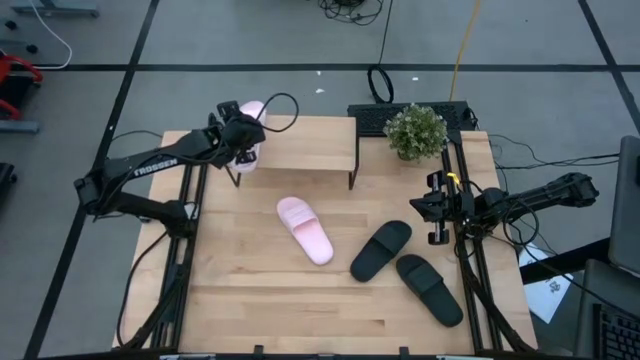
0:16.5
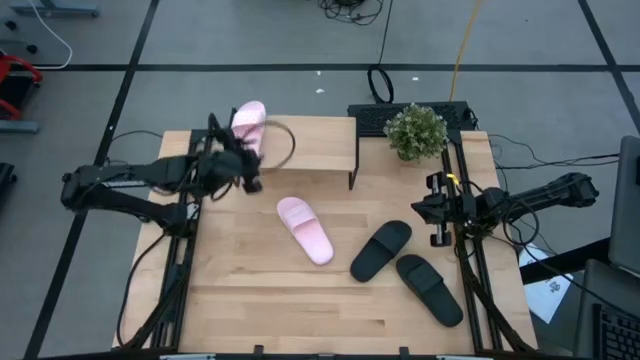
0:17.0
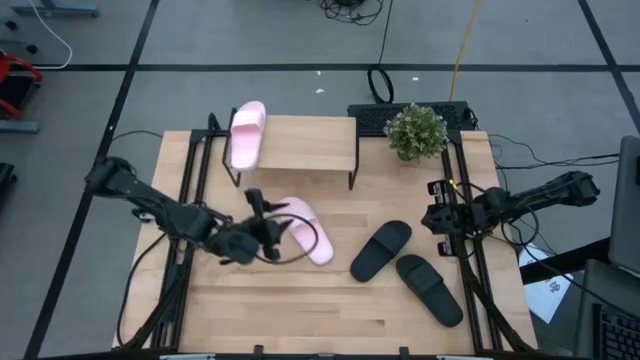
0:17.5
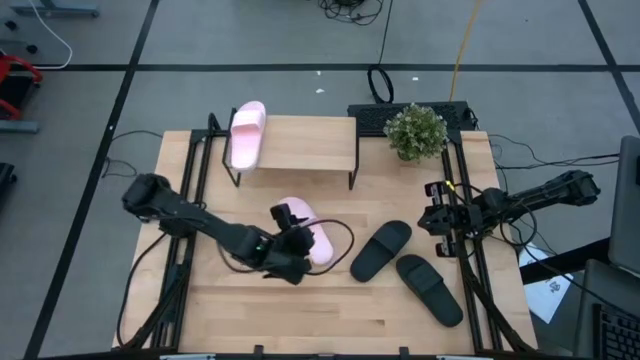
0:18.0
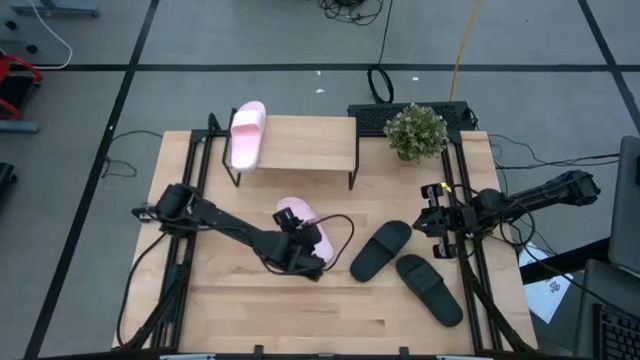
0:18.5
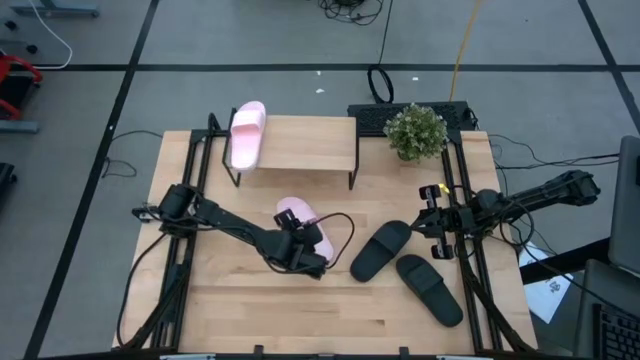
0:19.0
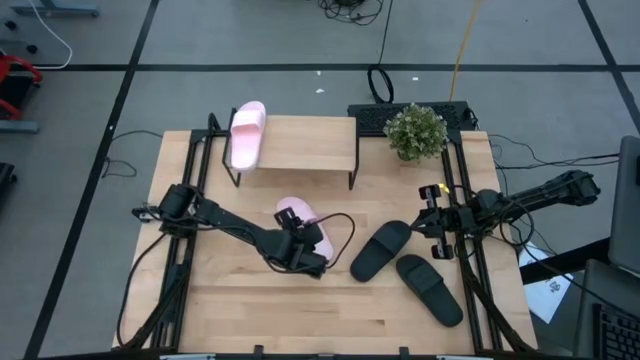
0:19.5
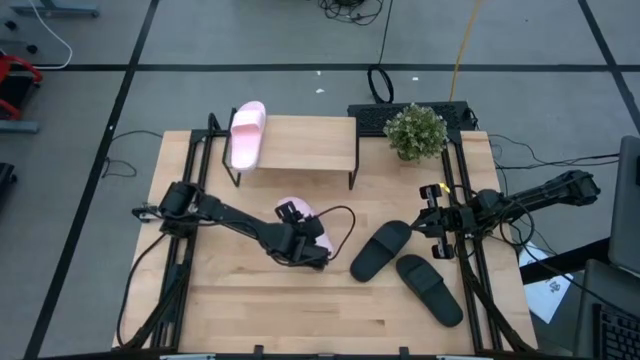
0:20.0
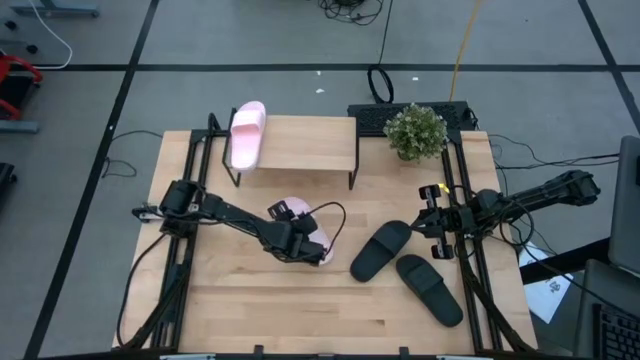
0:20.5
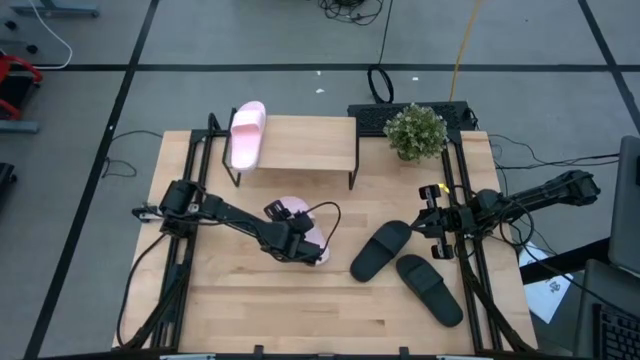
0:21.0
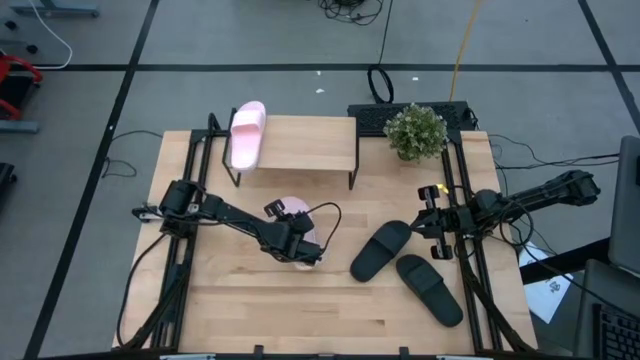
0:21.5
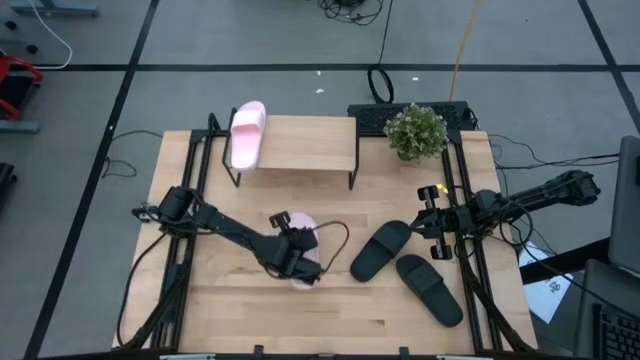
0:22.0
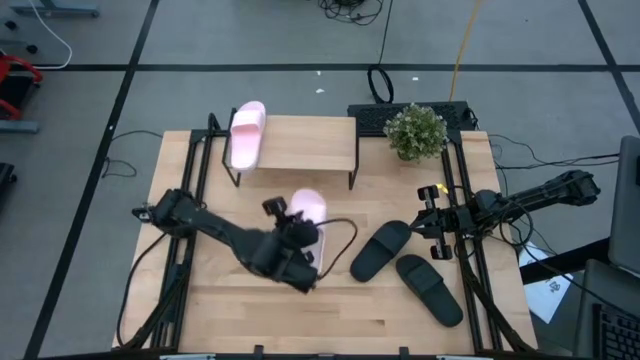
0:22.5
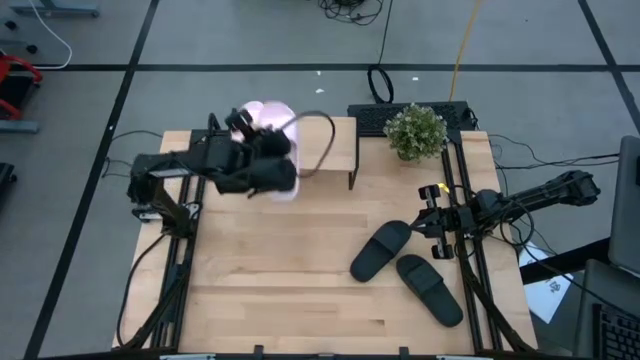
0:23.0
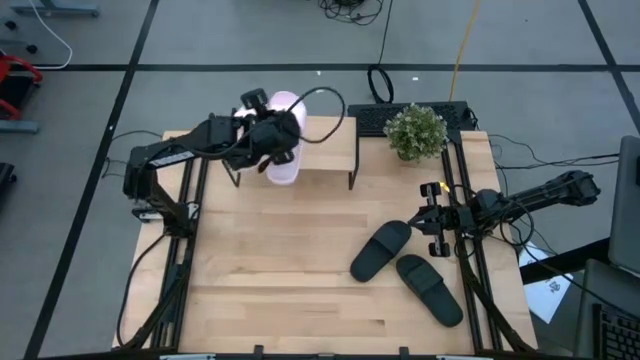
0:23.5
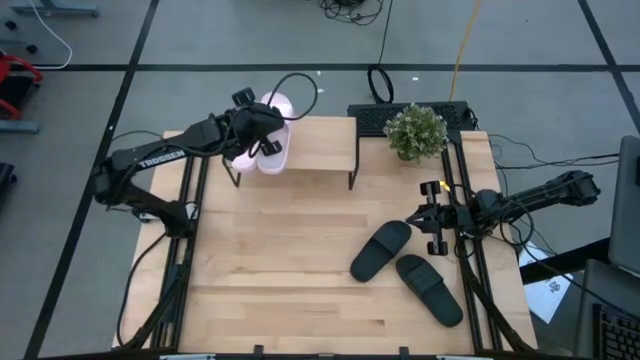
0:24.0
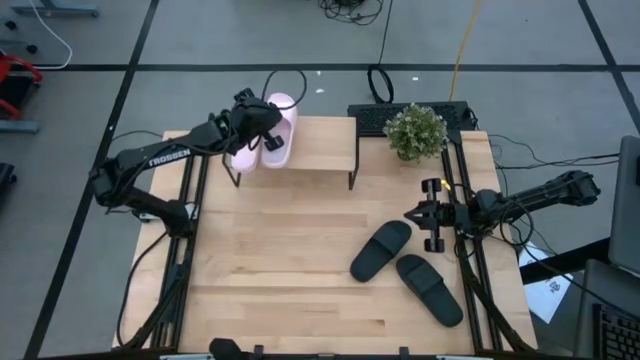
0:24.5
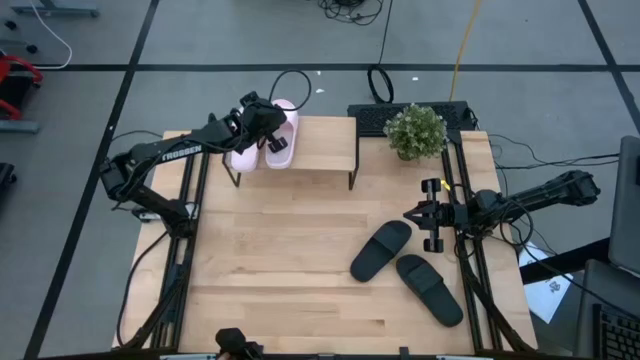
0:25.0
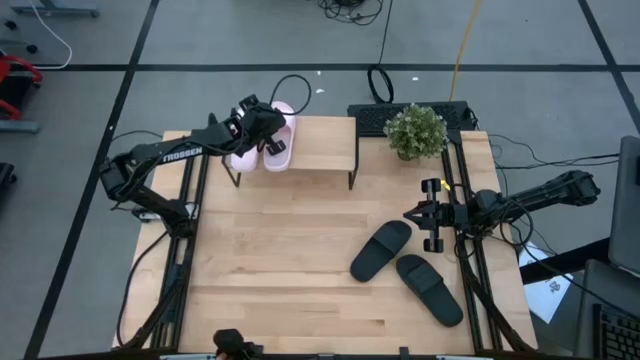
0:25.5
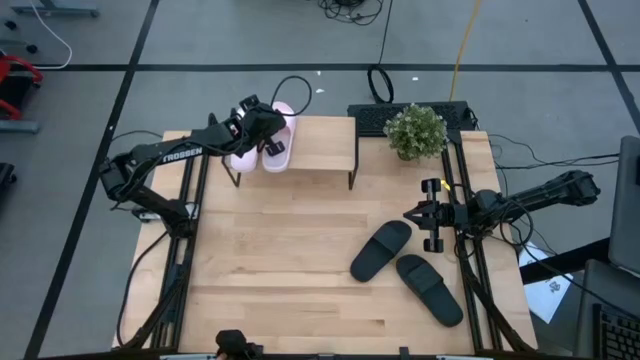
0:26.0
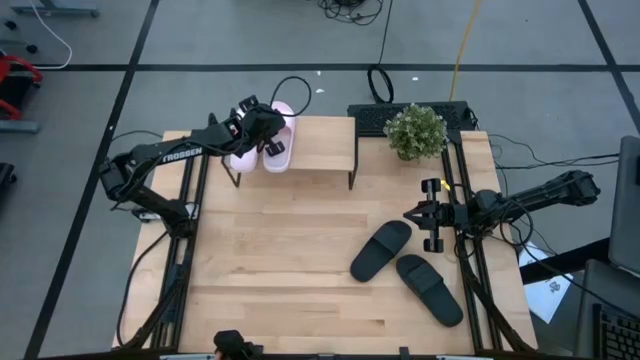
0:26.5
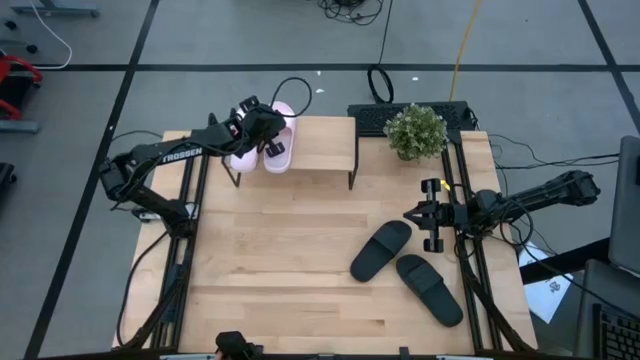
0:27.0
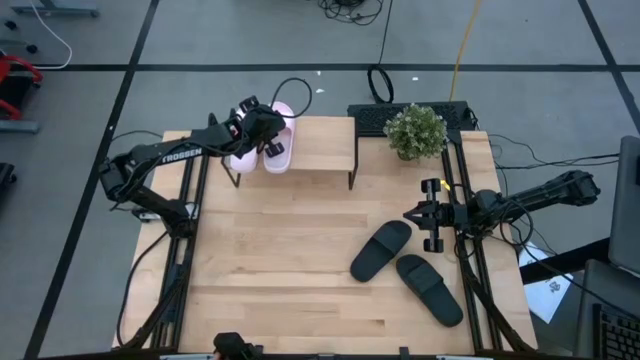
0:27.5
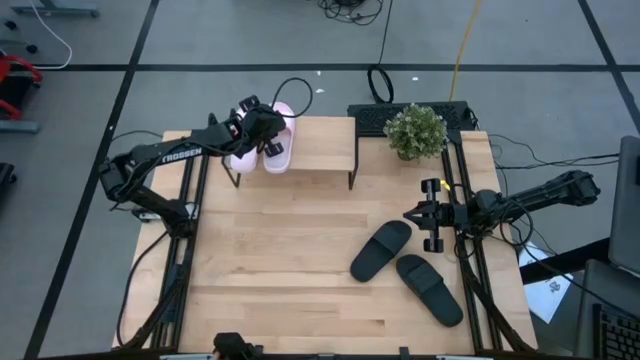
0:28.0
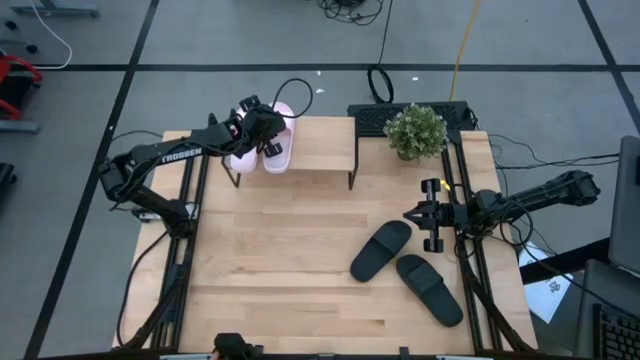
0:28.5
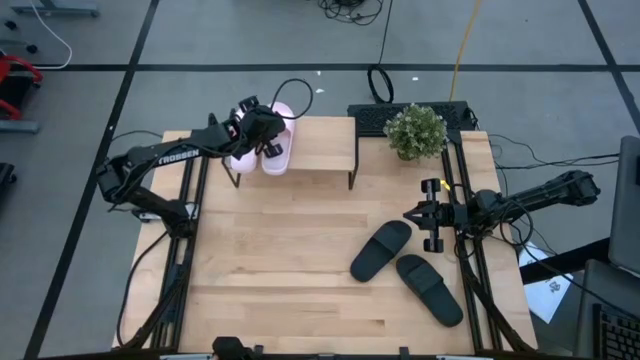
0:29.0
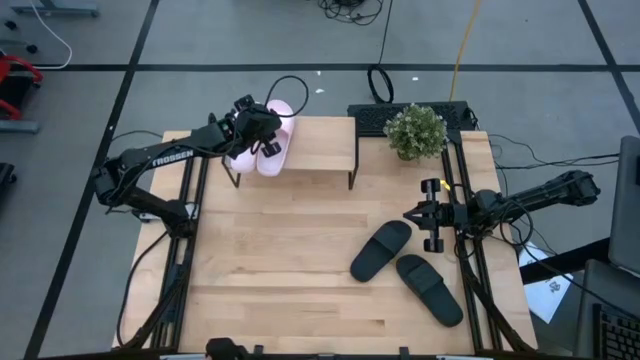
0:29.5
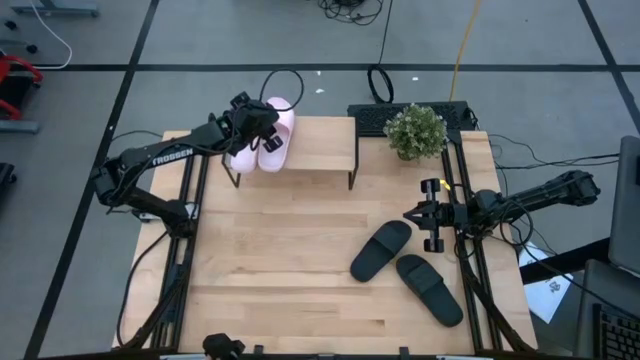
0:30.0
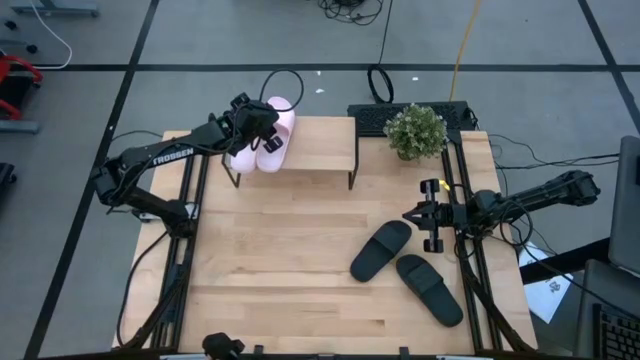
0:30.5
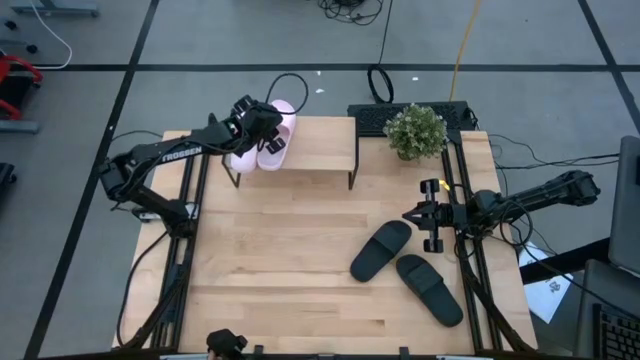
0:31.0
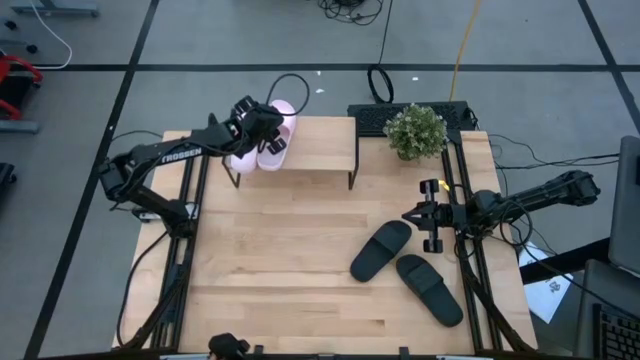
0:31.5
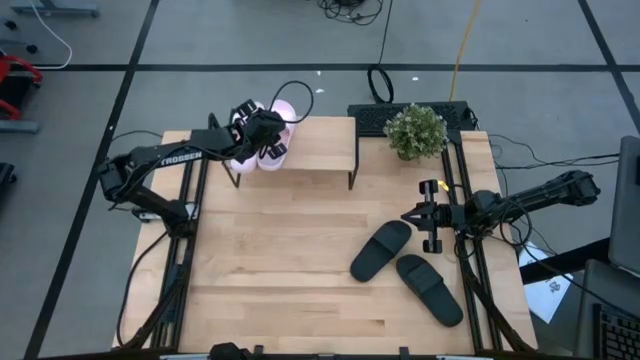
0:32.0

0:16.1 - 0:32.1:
Task: Pick and place slides into the shelf
Put the pink slides on the shelf

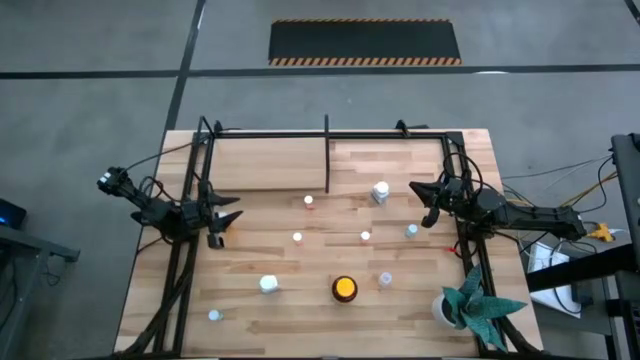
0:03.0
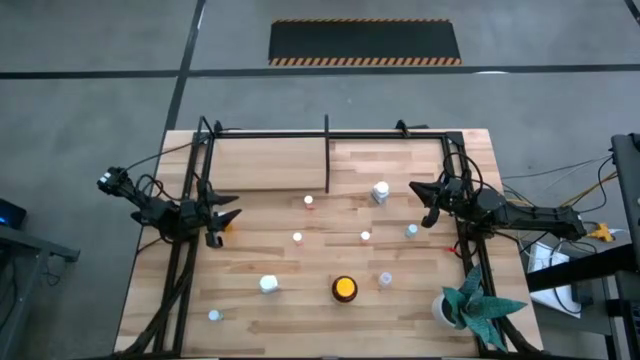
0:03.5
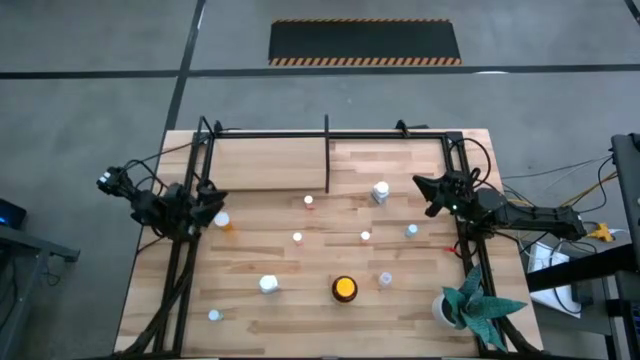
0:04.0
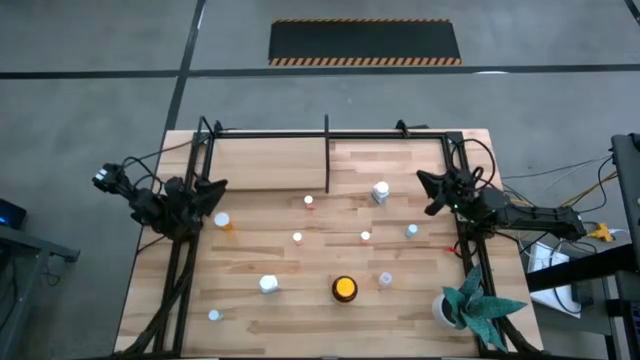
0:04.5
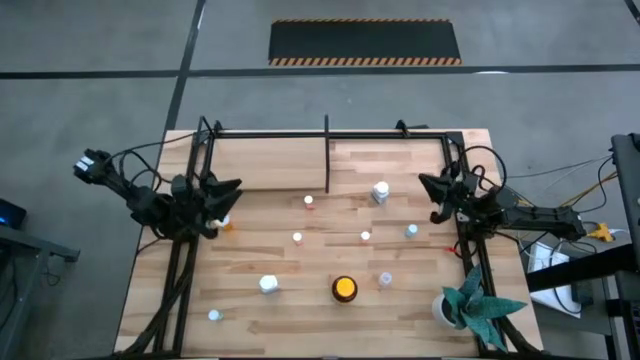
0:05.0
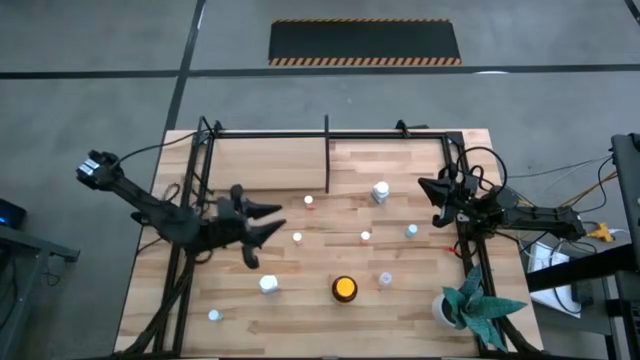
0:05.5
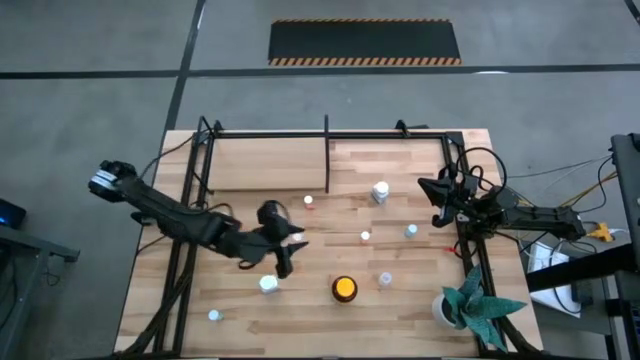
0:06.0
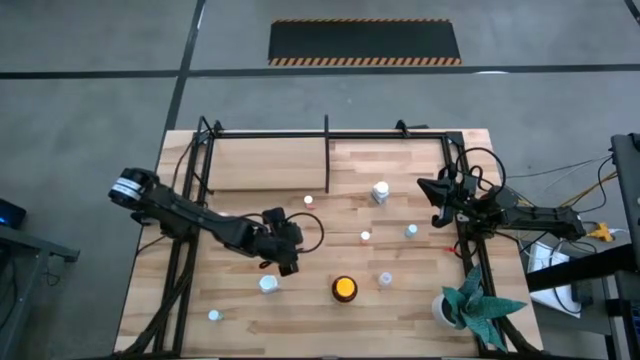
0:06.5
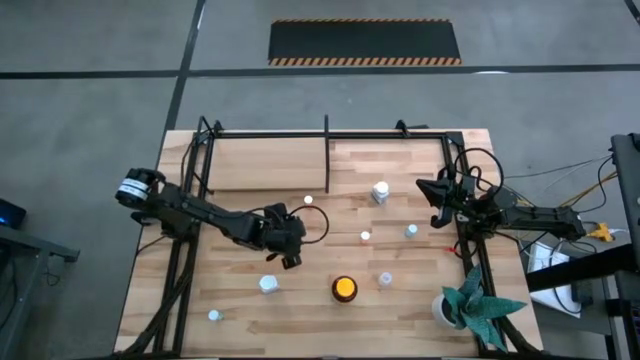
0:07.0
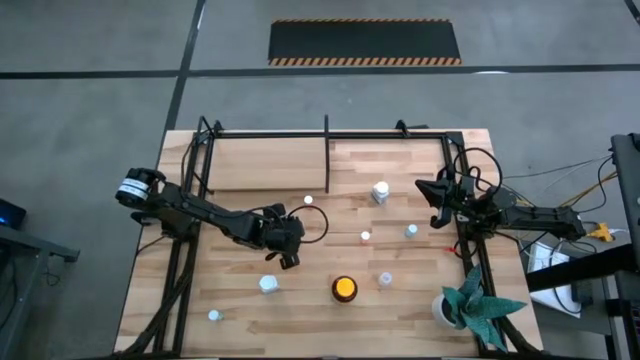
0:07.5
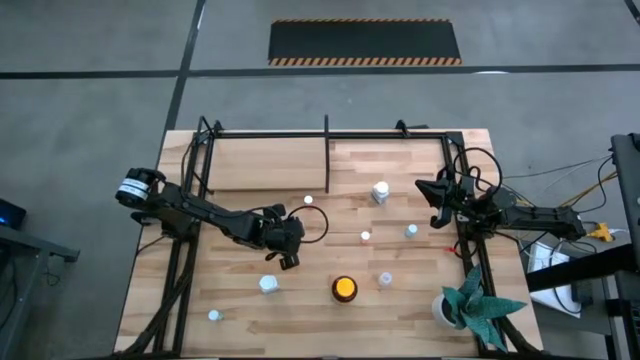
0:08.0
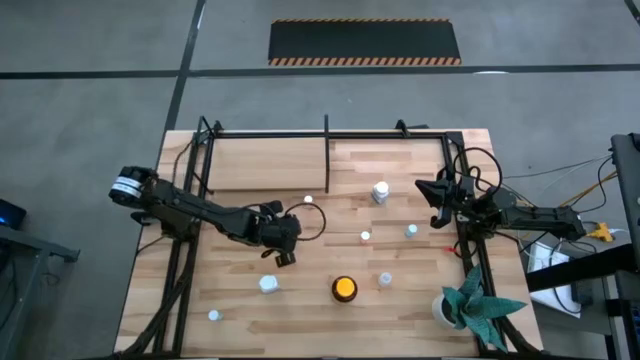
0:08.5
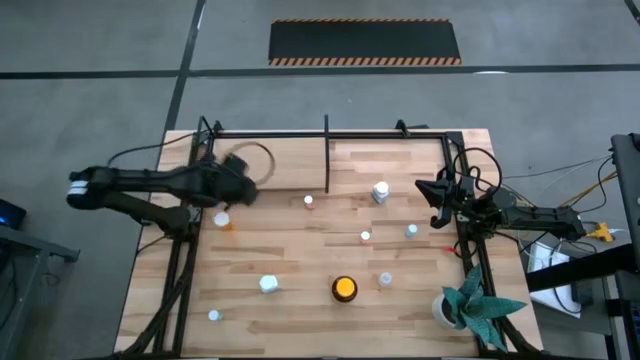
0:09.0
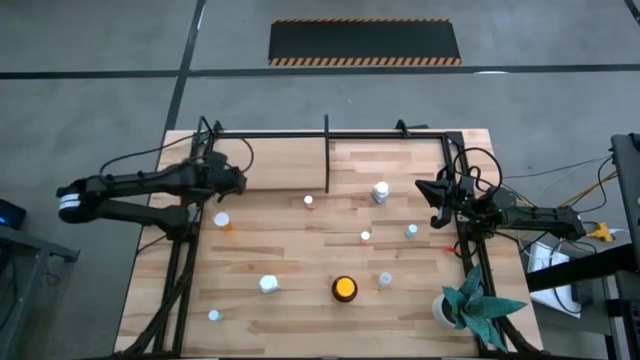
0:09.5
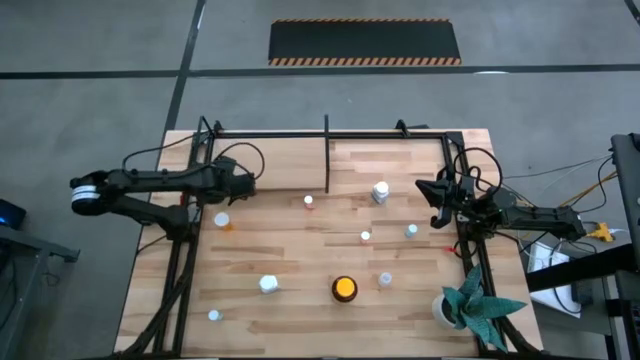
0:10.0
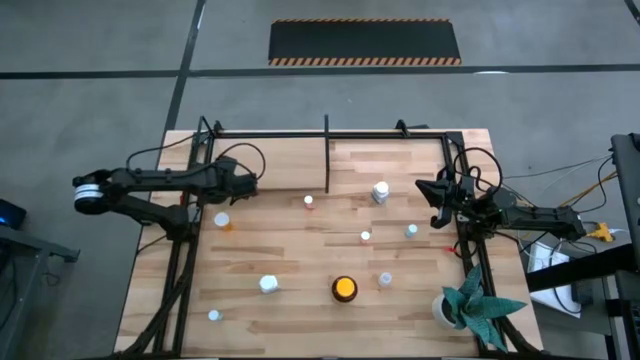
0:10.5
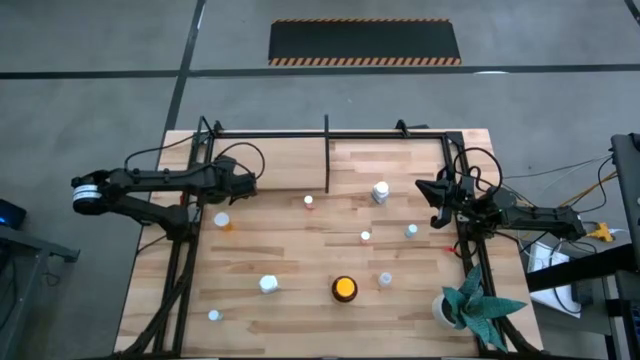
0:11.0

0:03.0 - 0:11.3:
Task: Pick and place medicine bottles onto shelf by color
Put the bottom left pink pill bottle on the shelf
